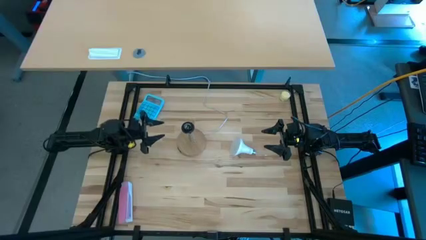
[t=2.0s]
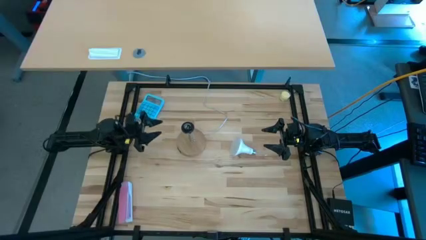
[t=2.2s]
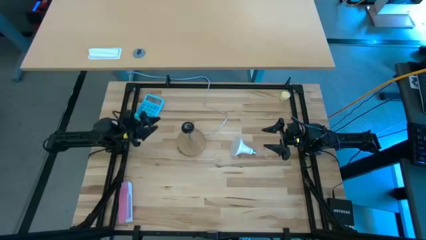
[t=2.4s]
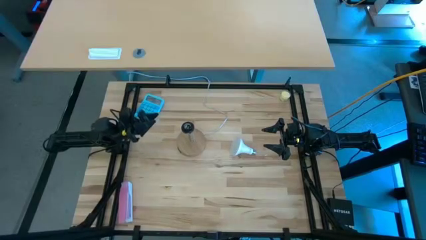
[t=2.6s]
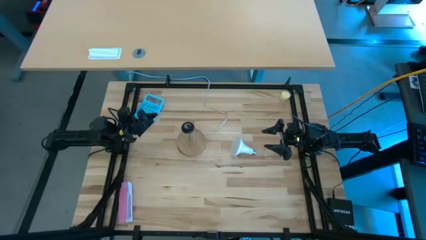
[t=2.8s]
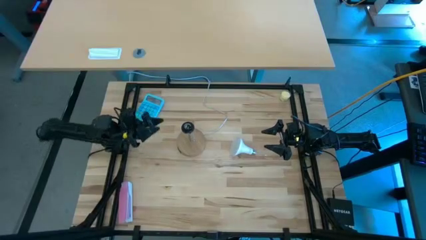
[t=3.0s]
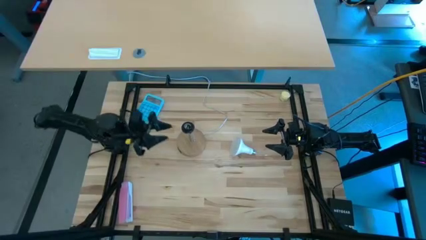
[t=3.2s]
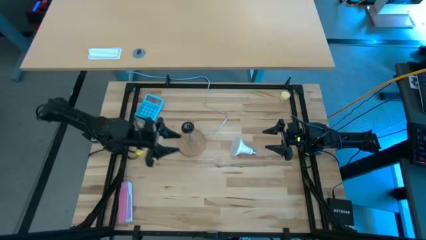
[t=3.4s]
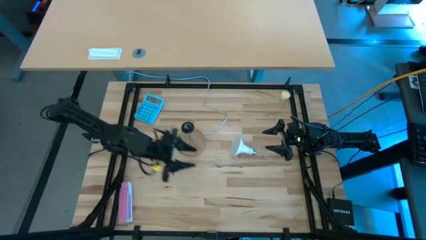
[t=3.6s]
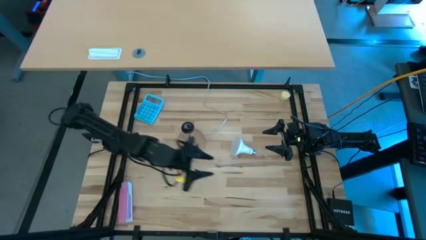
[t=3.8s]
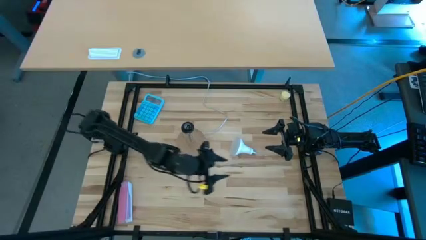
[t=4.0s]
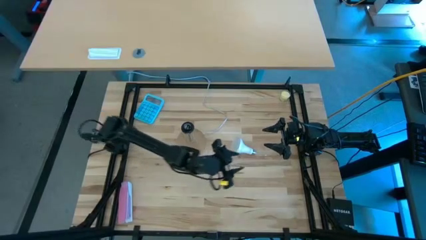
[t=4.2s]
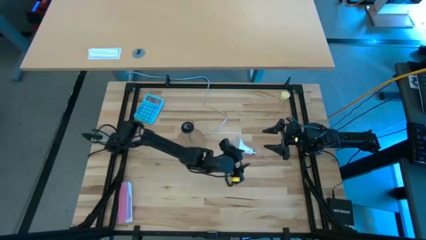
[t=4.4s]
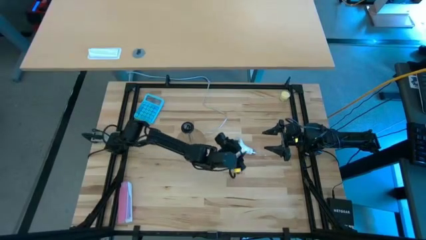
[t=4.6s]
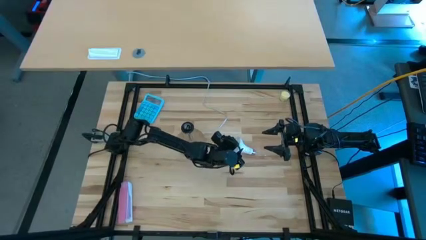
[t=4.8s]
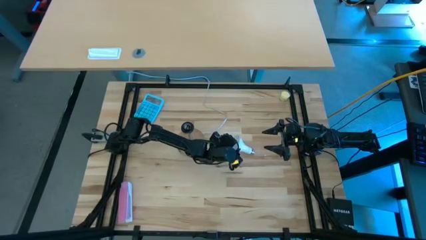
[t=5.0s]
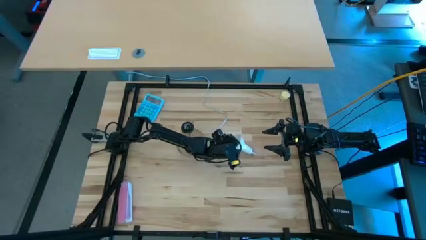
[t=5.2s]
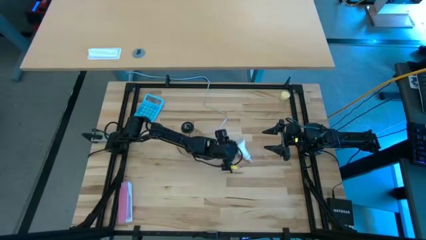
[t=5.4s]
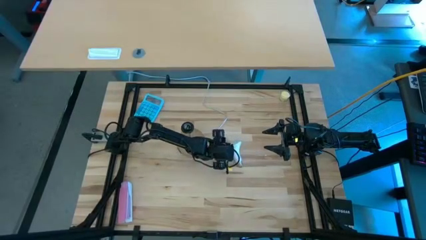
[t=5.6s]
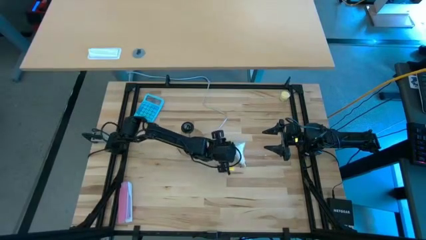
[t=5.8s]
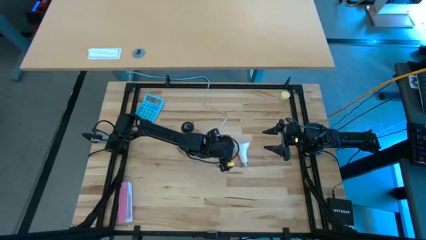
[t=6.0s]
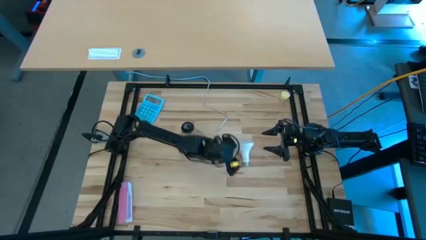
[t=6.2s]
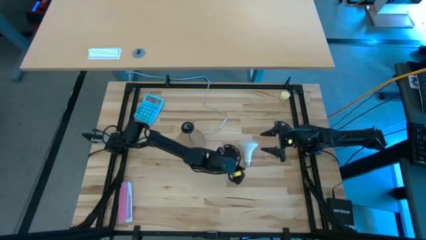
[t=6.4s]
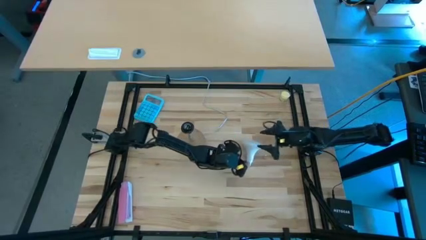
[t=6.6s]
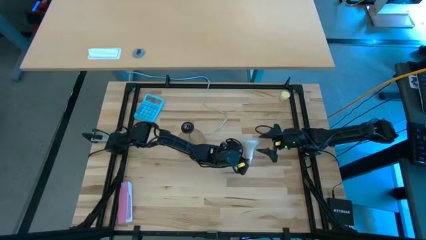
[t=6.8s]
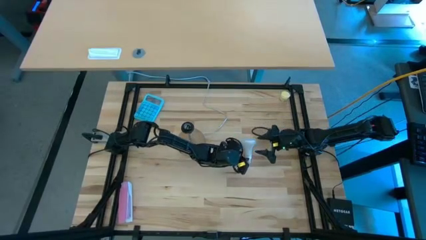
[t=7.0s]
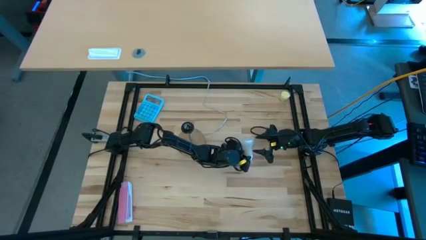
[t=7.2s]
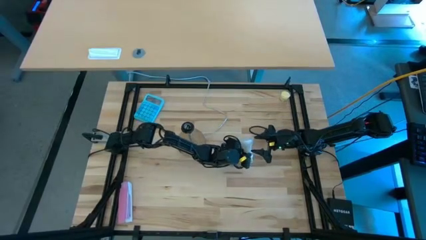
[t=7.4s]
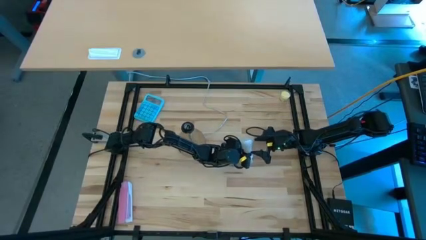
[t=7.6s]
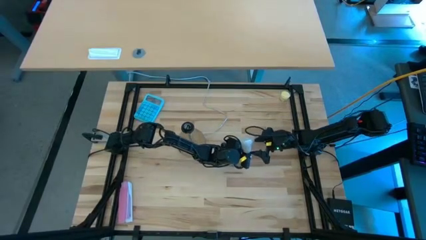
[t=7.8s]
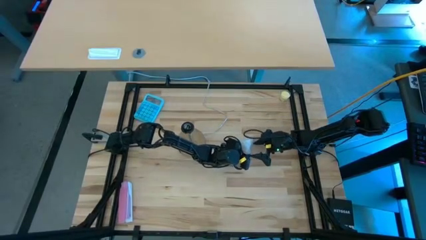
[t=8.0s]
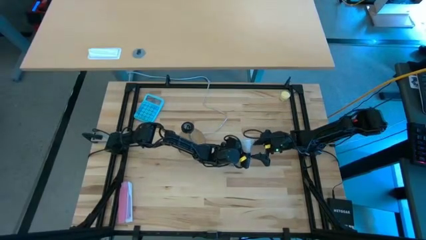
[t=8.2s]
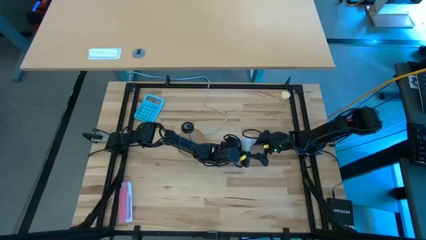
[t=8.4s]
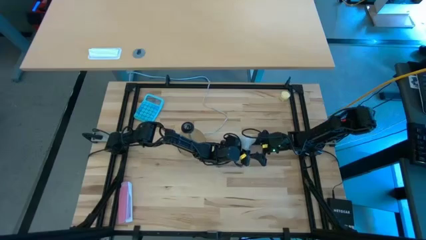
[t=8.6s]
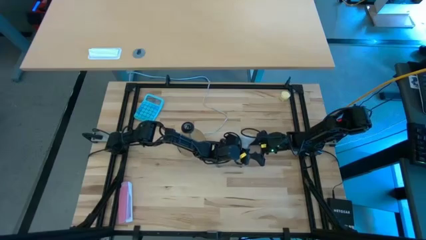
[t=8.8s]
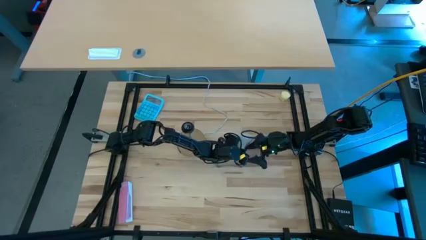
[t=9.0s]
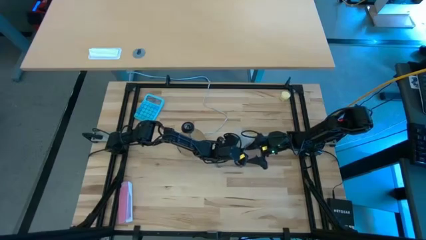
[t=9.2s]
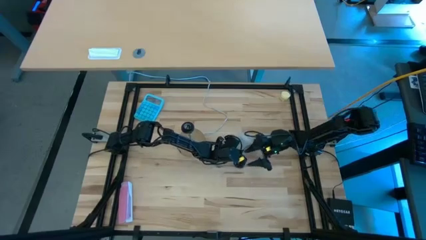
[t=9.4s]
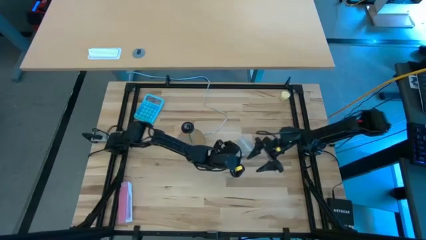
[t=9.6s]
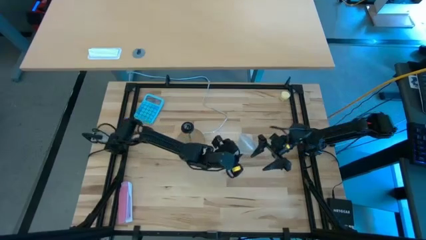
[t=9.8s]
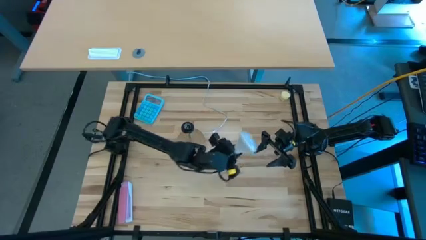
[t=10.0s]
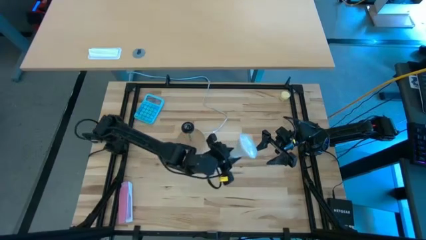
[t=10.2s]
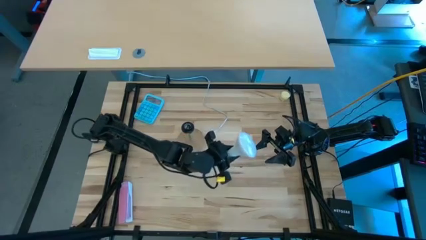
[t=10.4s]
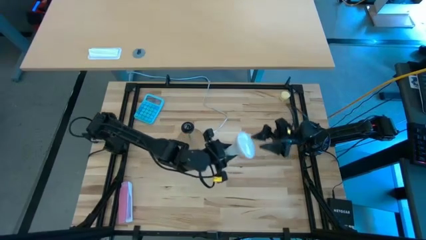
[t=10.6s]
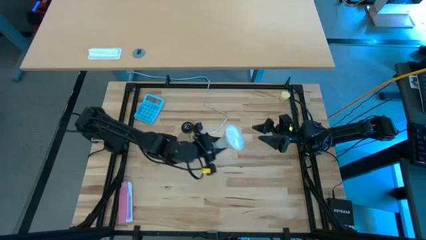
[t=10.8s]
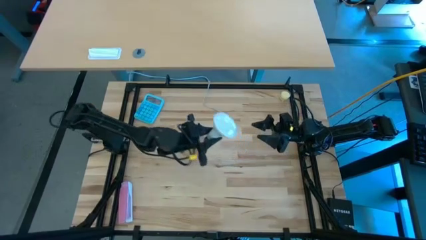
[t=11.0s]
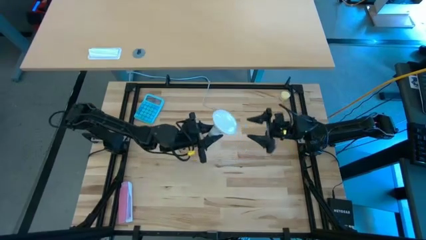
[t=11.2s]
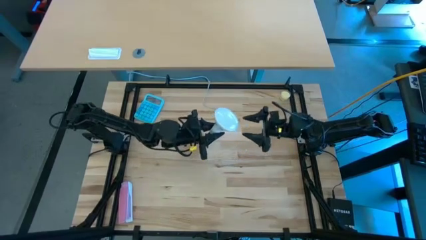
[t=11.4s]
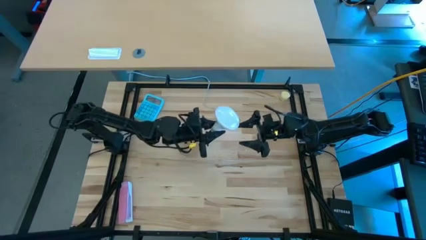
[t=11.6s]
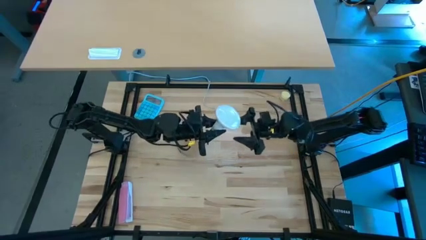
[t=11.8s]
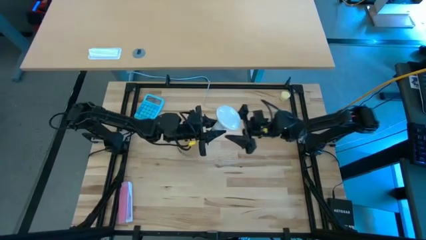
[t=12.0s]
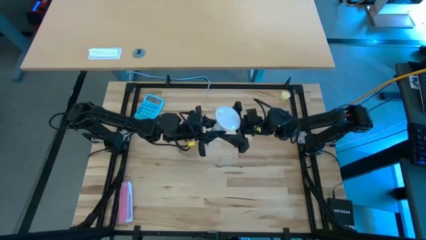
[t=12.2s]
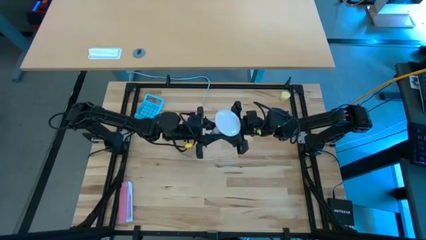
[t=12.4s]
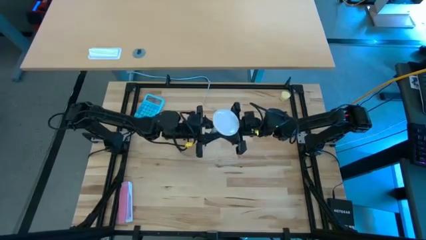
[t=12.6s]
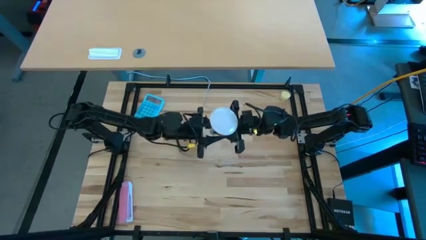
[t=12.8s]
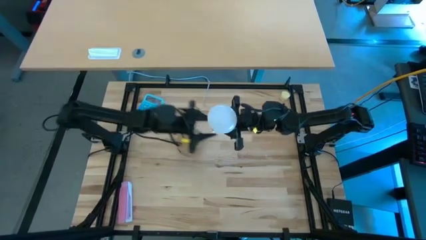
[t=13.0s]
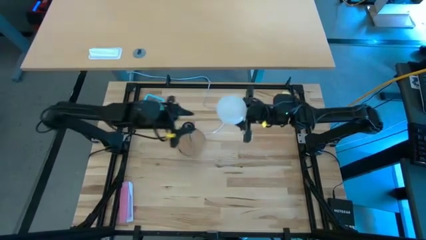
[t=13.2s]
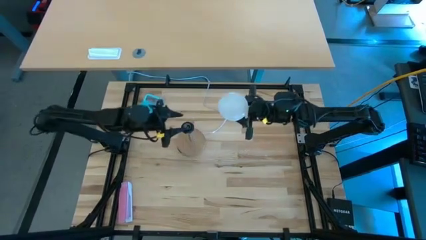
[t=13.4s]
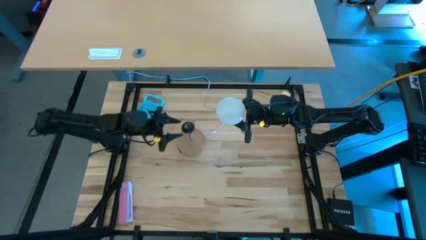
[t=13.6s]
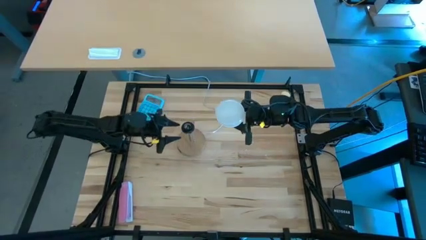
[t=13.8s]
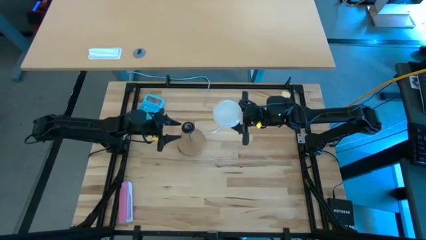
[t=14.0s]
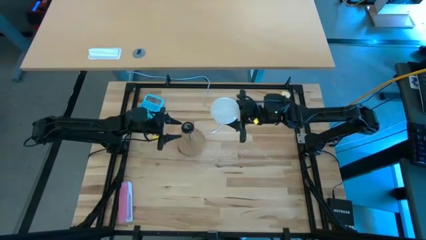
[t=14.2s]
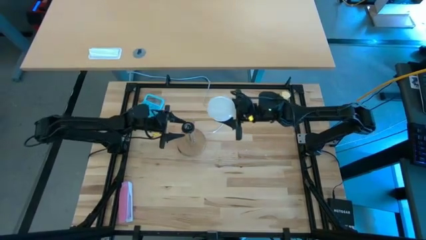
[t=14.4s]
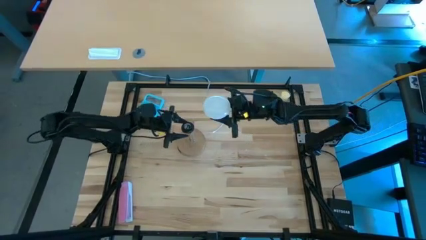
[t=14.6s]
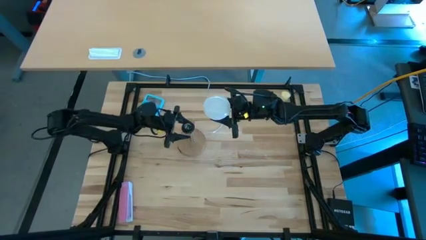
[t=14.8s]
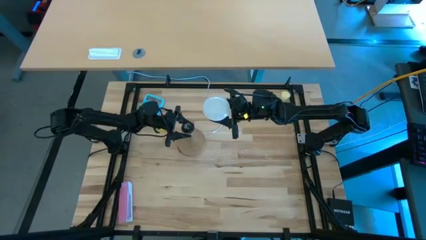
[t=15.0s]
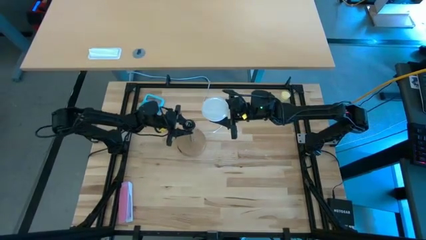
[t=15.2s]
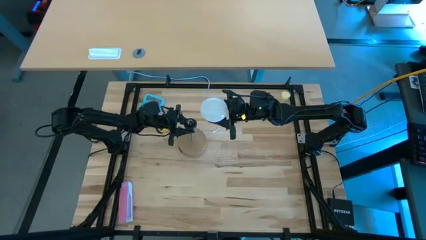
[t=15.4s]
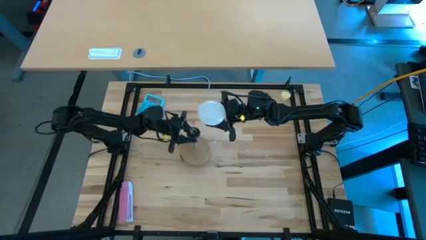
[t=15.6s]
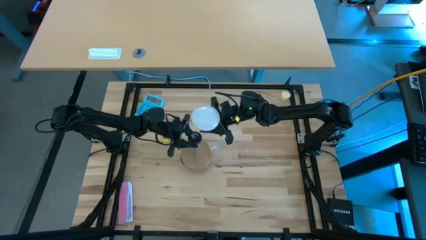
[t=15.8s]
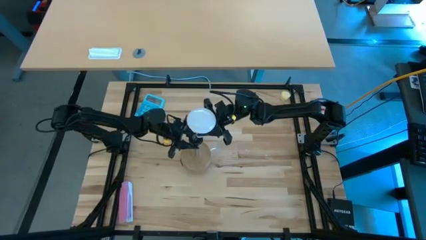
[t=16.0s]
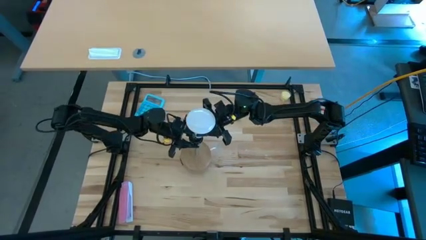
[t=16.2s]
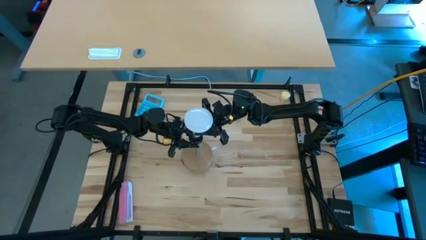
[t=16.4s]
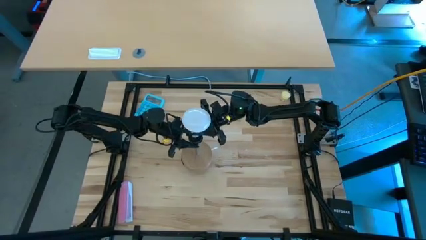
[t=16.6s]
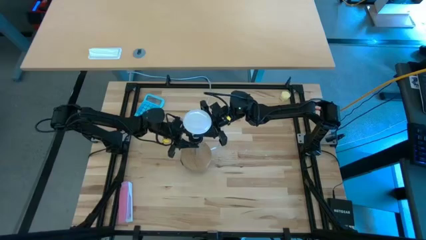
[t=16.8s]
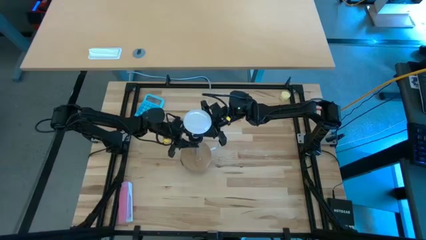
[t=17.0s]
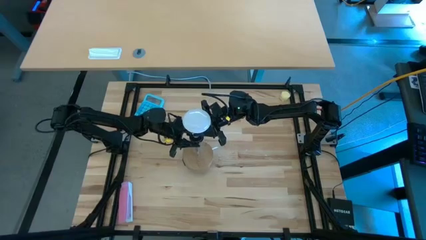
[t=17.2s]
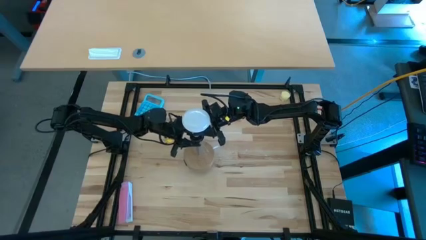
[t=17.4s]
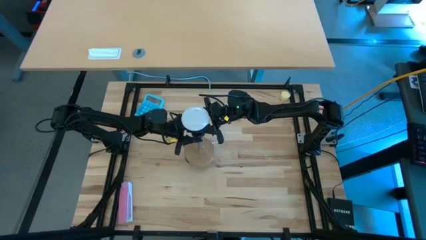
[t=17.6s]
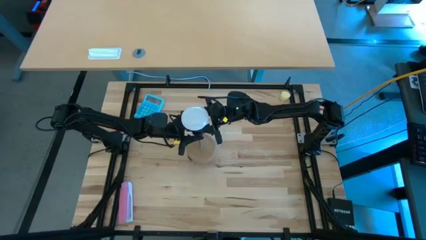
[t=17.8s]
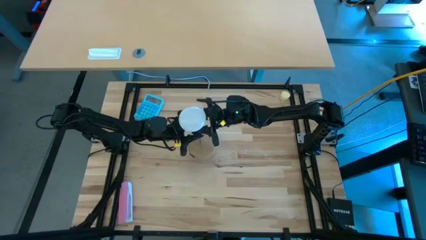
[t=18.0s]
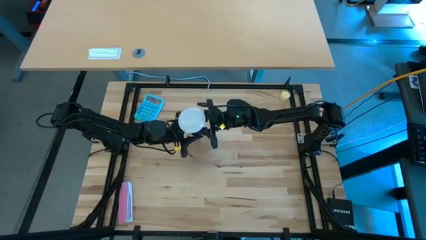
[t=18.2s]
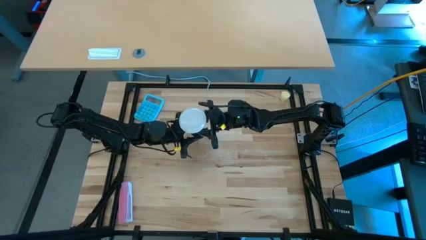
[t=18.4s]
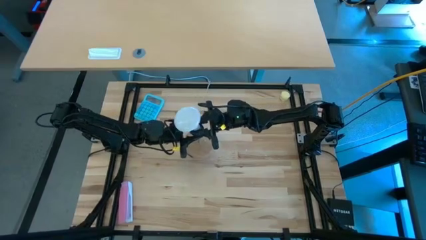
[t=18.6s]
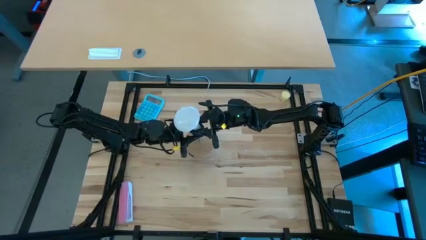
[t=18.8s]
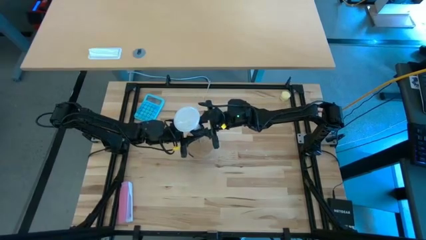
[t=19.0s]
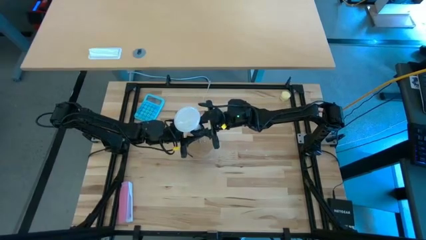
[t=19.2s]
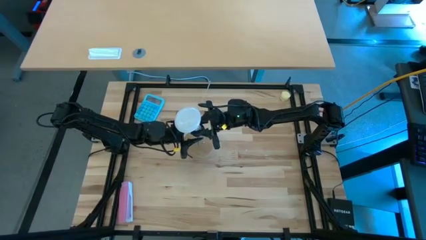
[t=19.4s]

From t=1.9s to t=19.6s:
Task: Screw lightbulb
Insert the light bulb into the lamp
